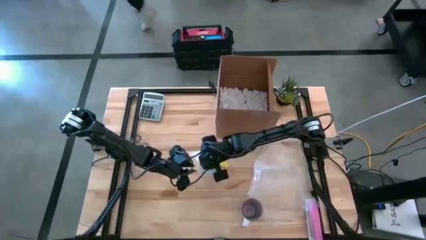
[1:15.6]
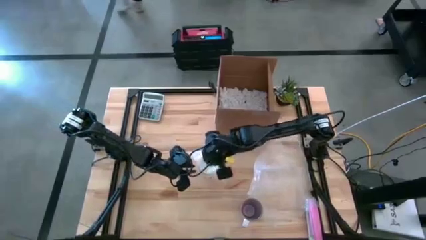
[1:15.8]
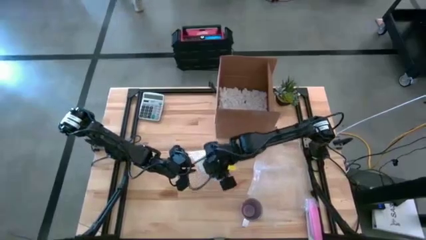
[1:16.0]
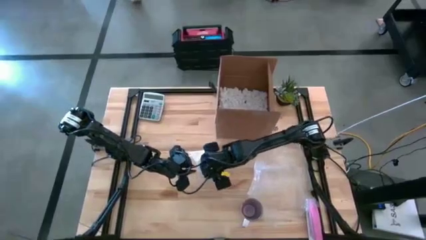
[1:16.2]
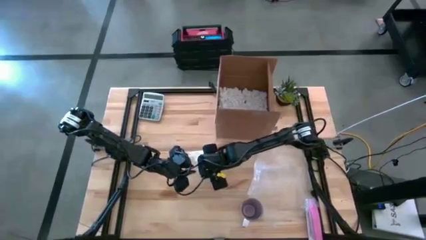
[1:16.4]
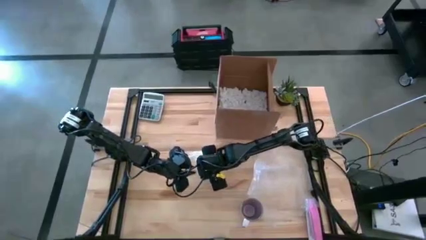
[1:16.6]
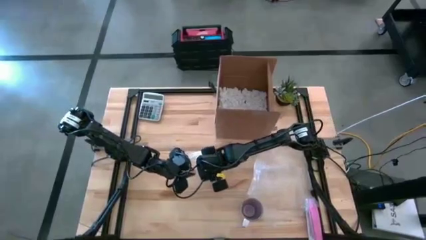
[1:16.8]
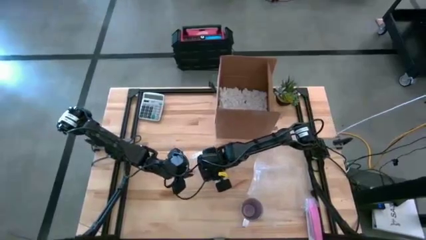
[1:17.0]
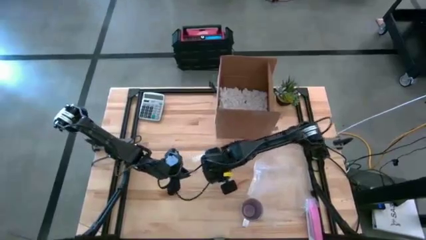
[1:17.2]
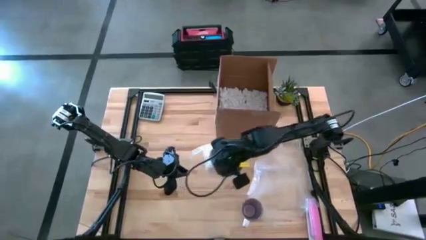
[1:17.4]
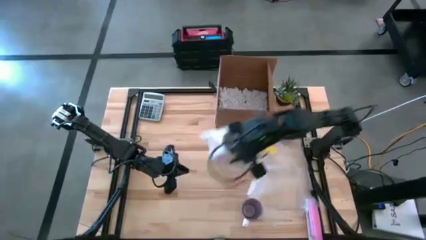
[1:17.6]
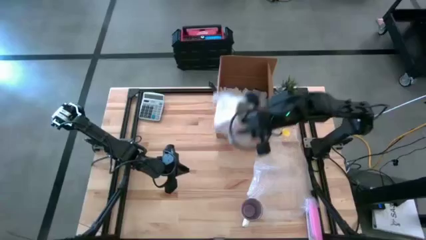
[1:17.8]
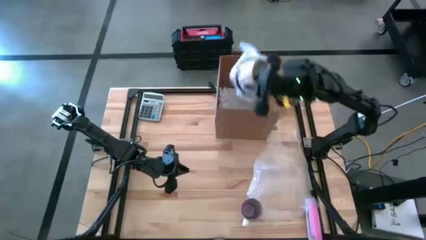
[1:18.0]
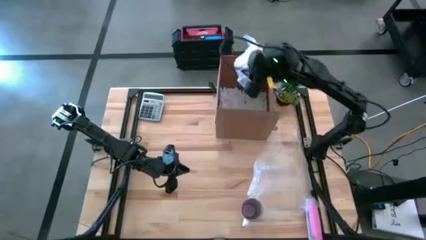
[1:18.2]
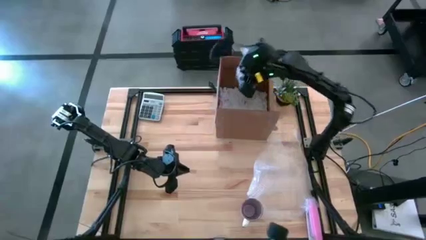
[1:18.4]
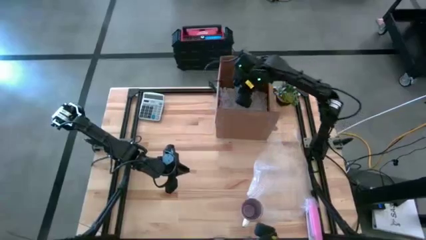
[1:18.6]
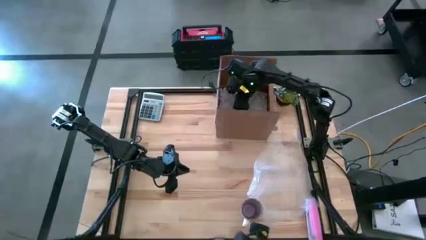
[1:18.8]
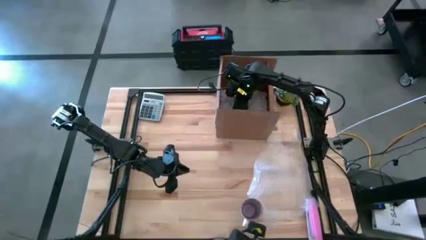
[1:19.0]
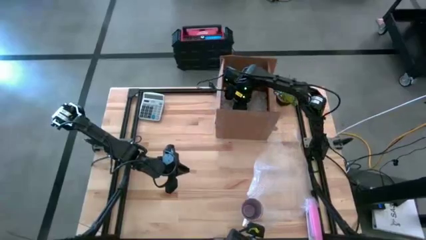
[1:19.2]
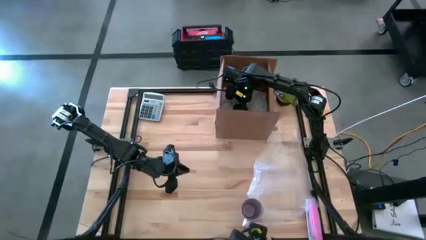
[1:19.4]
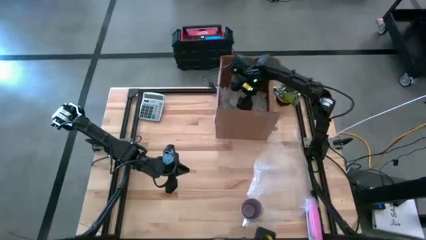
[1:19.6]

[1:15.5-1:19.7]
Task: wrap mug
Put the wrapped orange patterned mug into the cardboard box

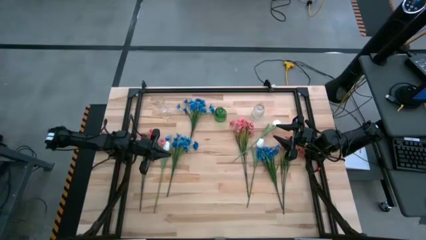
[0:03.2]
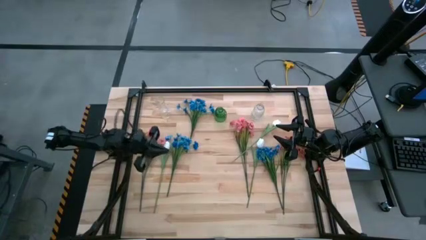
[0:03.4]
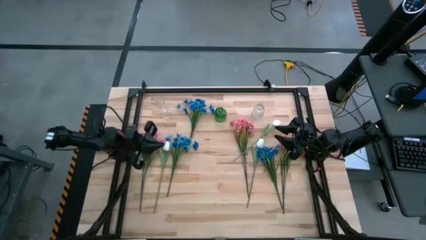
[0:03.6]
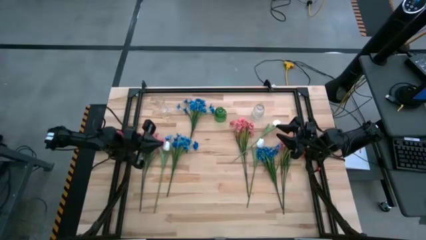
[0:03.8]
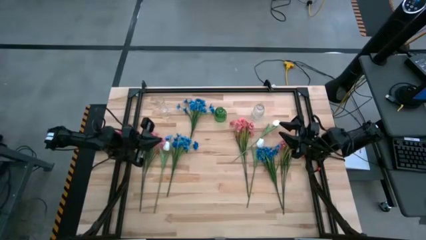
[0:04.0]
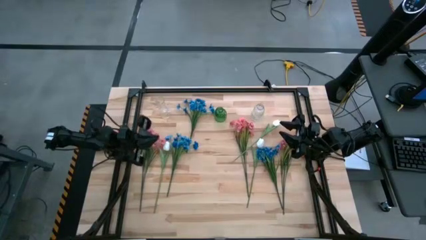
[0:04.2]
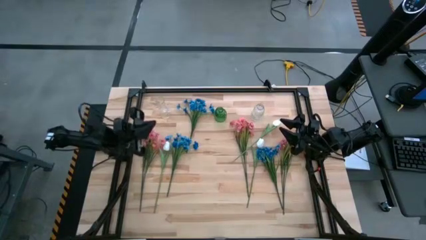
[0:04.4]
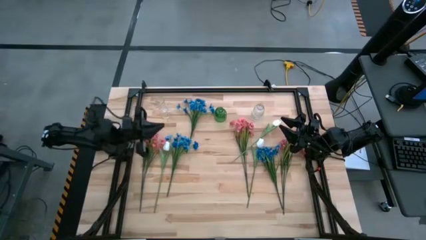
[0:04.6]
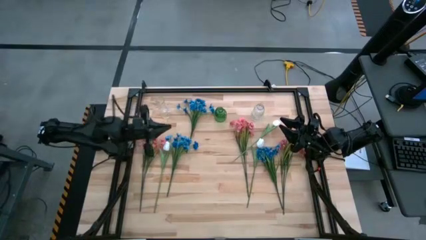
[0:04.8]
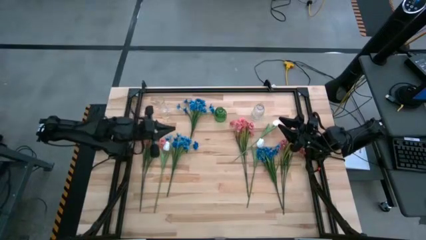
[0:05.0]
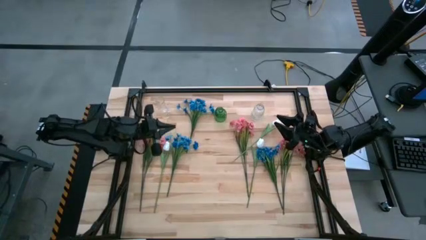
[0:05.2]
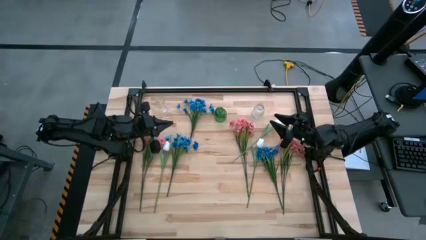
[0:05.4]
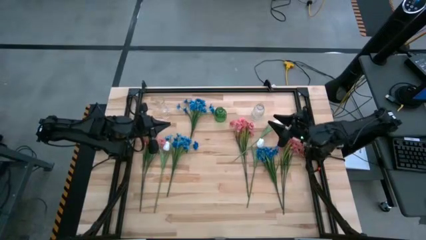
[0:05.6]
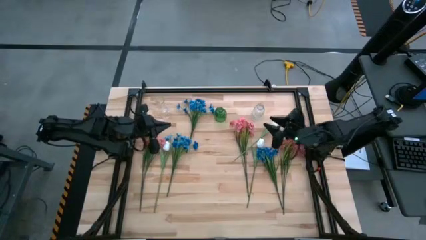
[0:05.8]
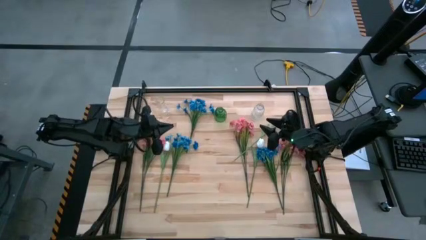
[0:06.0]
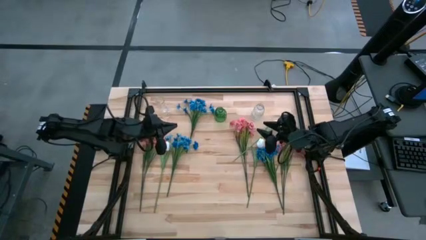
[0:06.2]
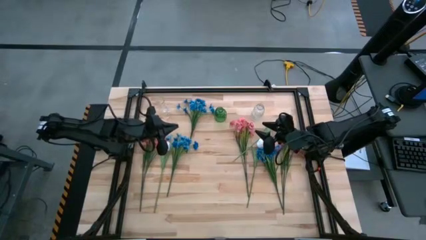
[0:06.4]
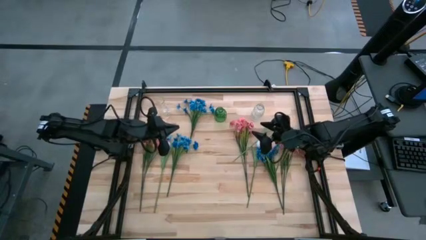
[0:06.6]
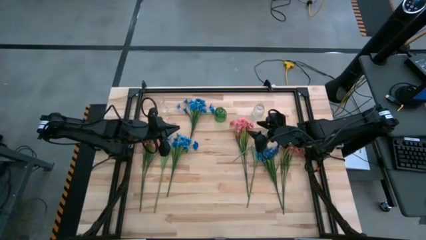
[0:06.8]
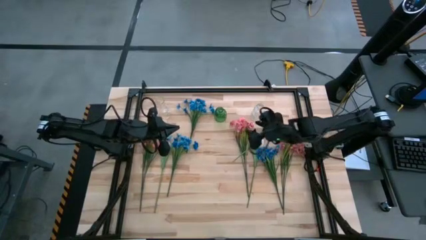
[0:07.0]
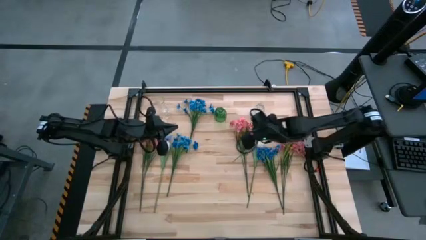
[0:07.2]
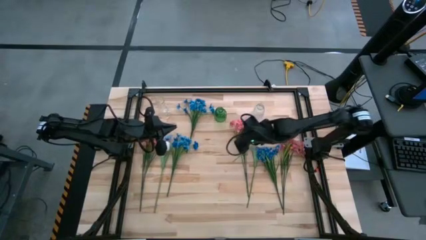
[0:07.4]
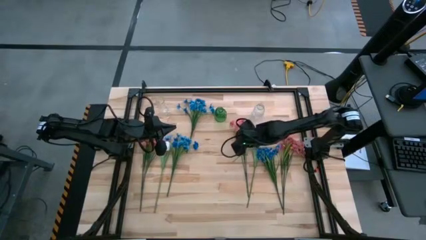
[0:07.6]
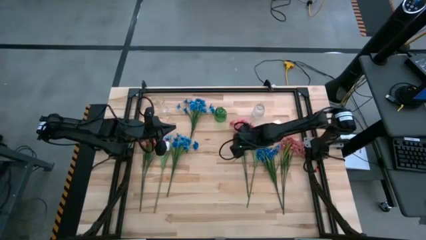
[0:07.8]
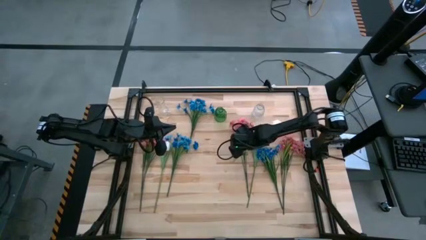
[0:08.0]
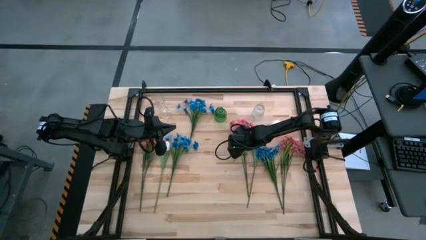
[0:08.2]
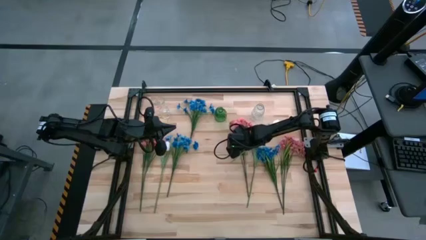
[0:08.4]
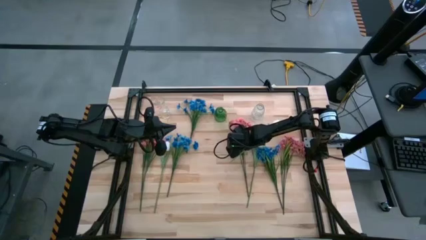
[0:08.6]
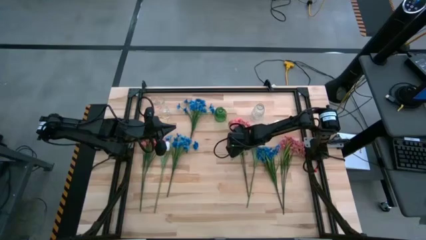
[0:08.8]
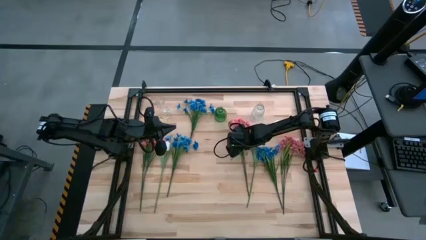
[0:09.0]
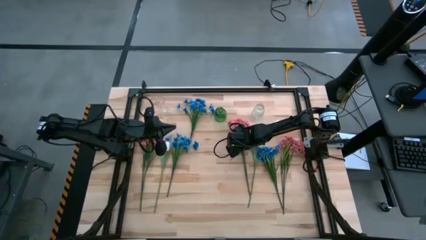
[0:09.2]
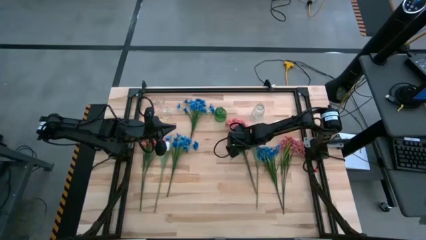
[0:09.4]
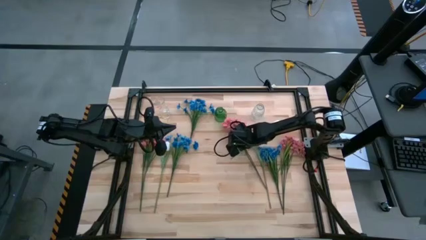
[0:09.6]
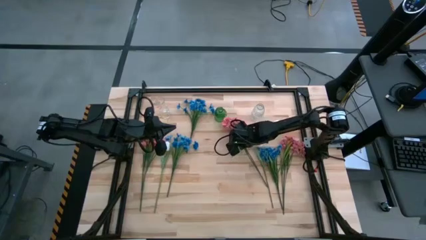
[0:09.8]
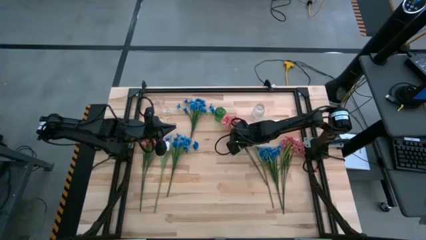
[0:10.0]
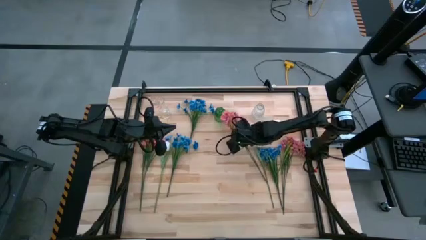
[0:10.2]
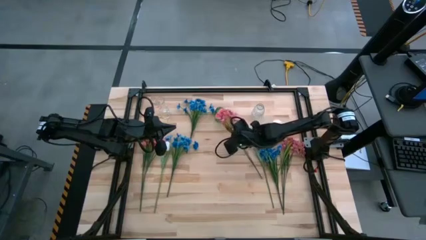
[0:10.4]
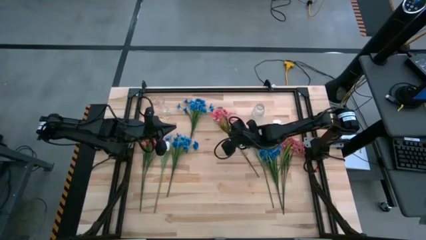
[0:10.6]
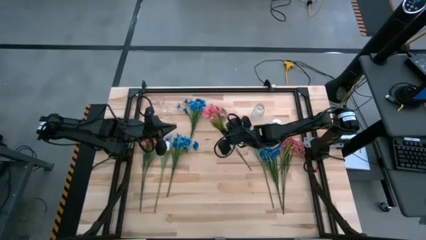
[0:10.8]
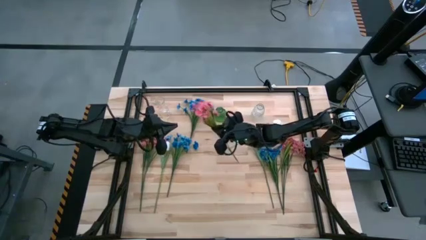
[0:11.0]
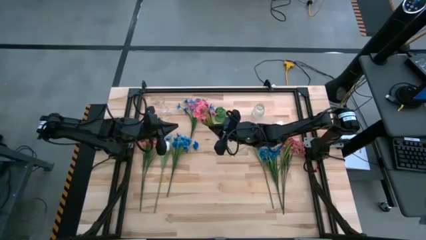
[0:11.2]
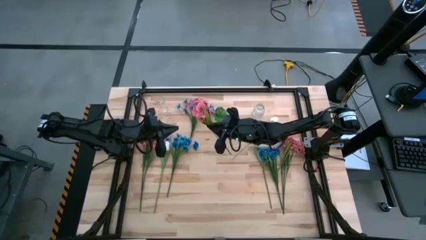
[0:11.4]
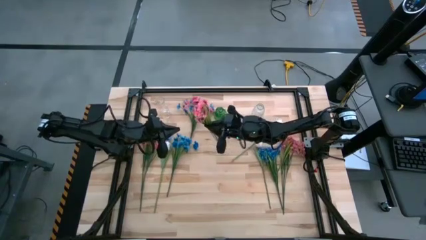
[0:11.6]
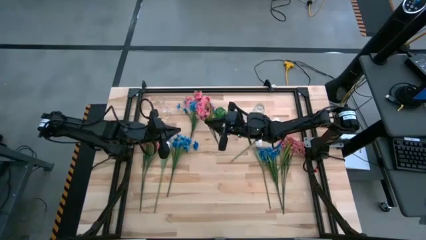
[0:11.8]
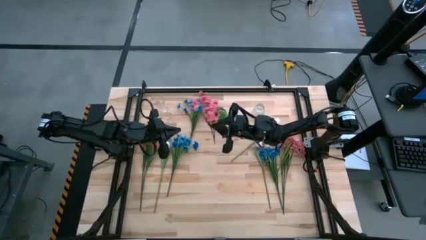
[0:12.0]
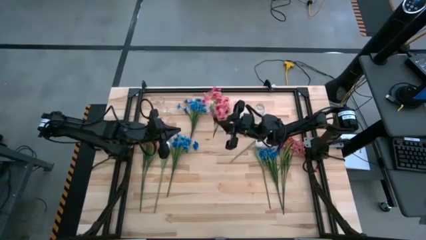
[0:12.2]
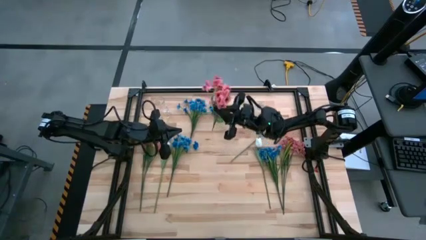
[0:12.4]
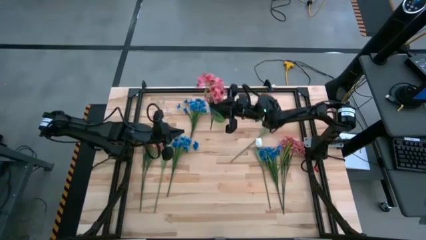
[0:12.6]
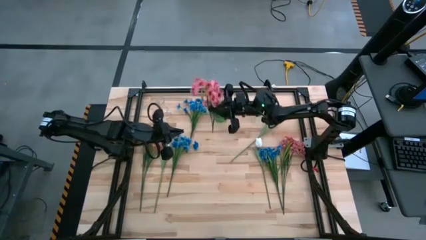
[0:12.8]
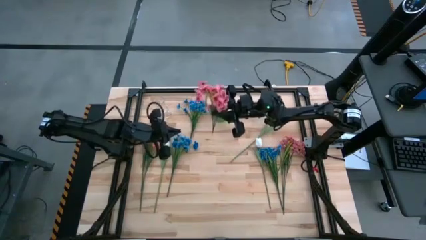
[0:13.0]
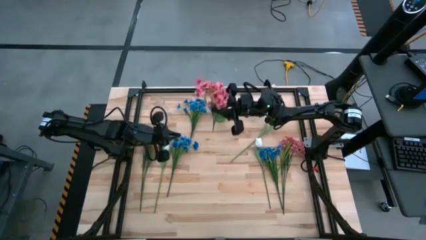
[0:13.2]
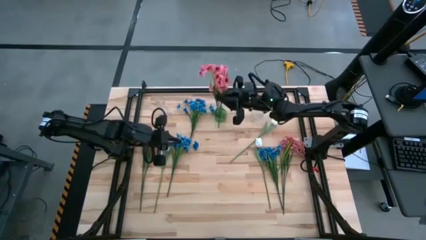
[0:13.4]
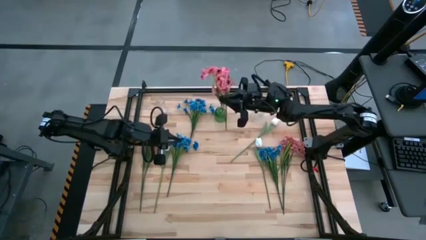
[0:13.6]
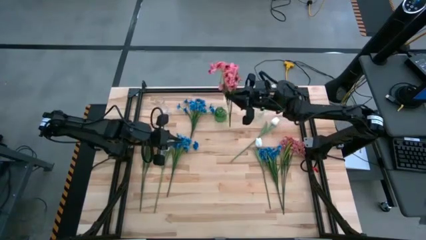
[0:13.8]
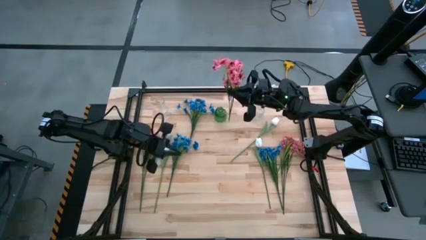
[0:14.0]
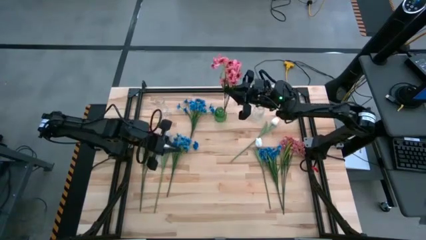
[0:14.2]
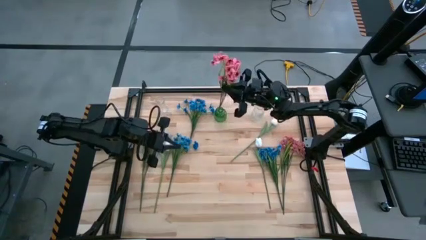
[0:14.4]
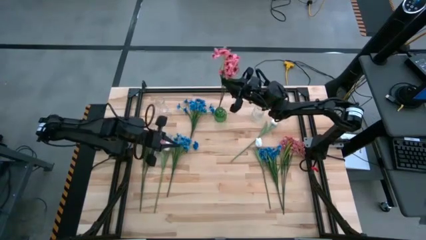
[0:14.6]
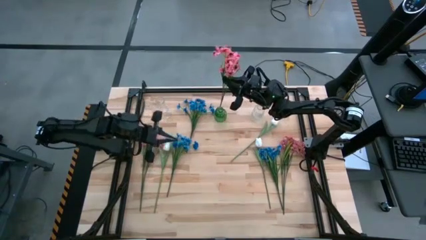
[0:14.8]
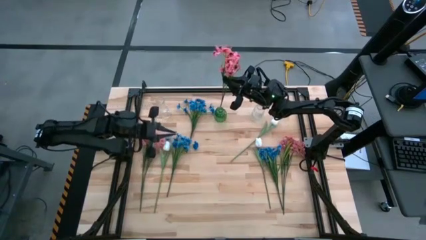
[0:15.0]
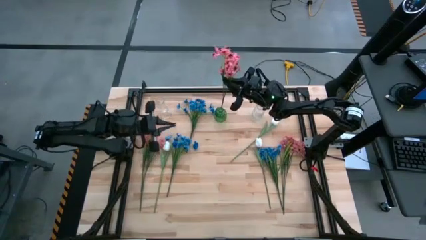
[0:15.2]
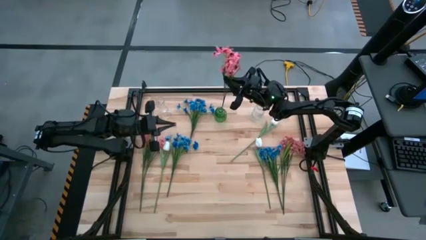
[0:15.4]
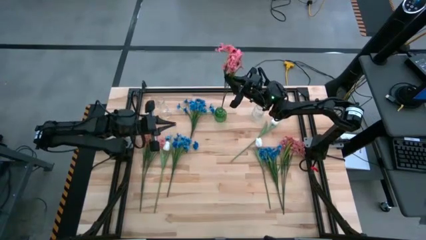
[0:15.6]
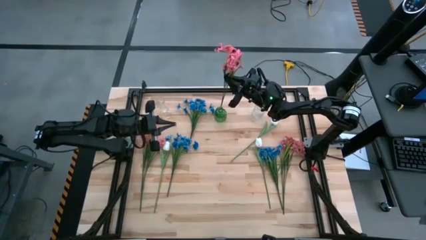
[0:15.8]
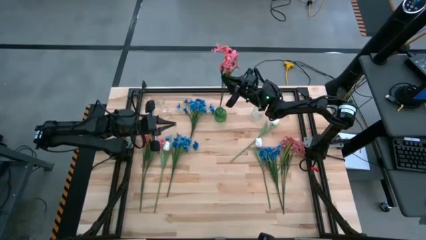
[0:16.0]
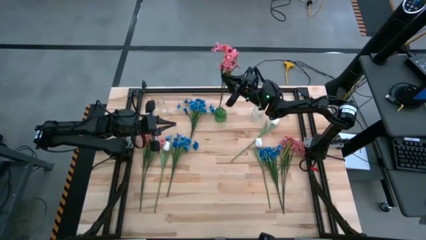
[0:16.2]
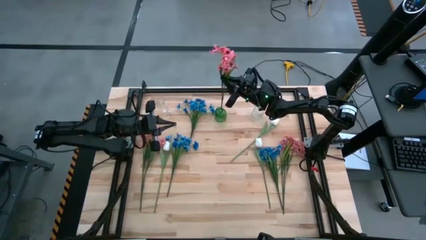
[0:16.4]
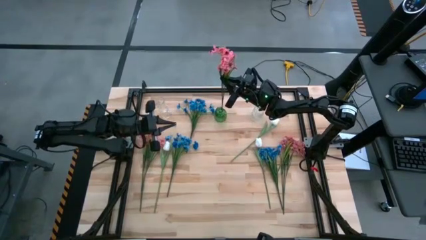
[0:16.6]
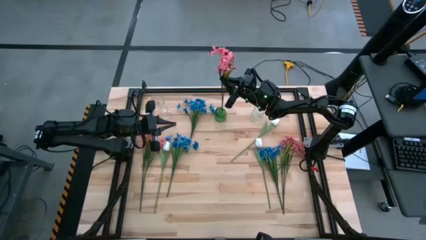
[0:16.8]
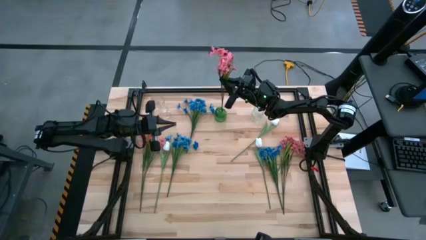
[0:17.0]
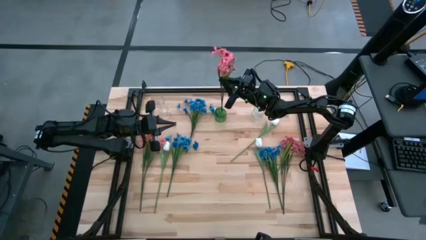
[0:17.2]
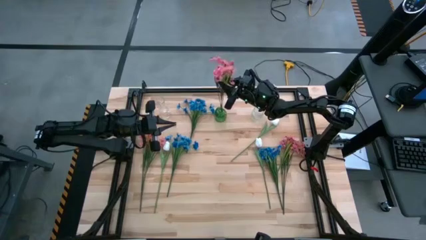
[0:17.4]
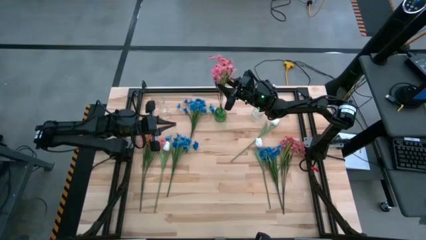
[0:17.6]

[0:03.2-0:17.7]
Task: Sort flowers into vase by color
Put the middle pink flowers into the green vase
